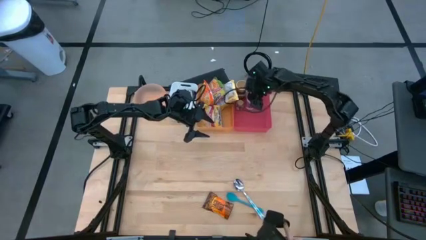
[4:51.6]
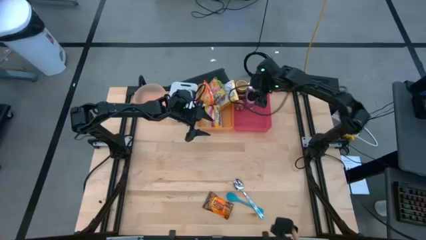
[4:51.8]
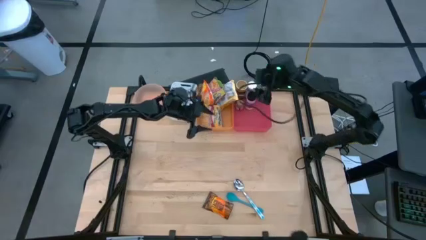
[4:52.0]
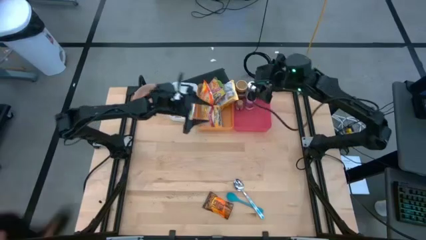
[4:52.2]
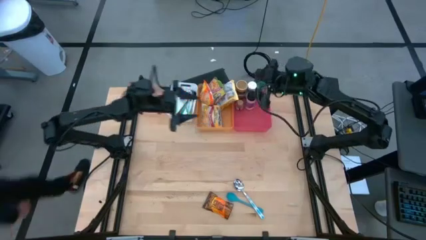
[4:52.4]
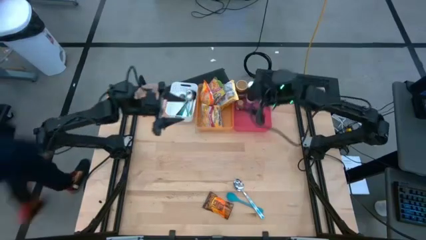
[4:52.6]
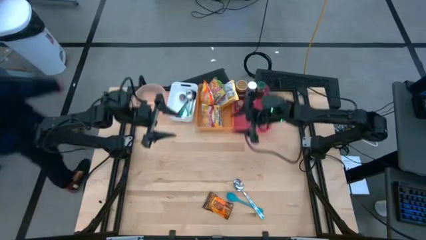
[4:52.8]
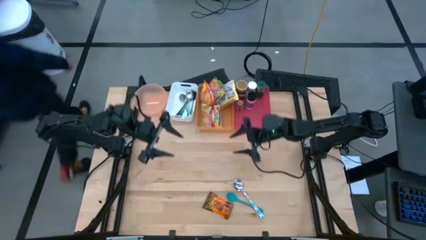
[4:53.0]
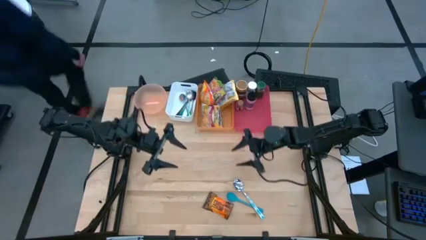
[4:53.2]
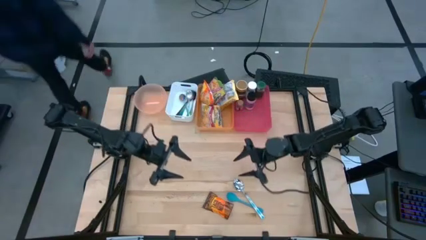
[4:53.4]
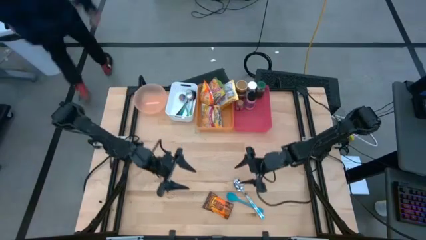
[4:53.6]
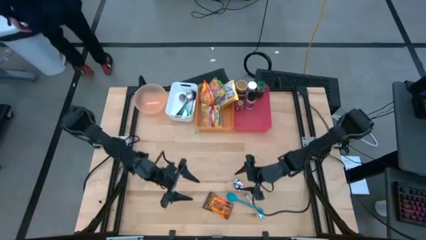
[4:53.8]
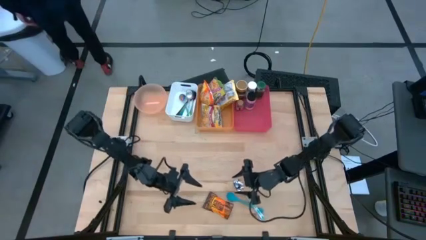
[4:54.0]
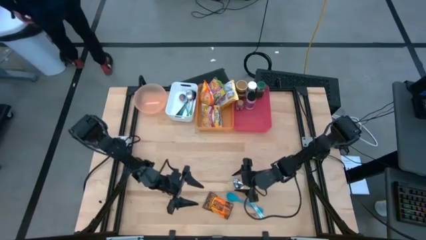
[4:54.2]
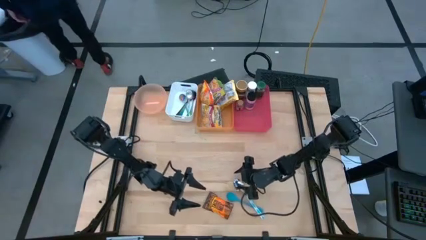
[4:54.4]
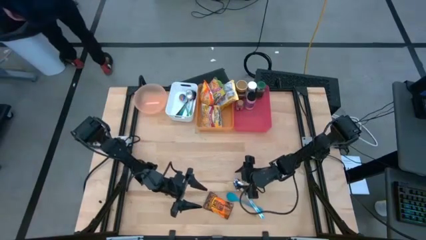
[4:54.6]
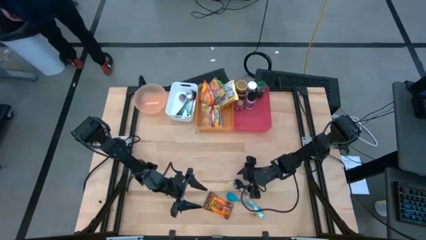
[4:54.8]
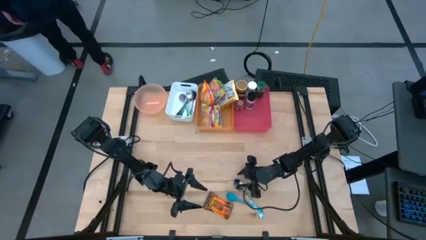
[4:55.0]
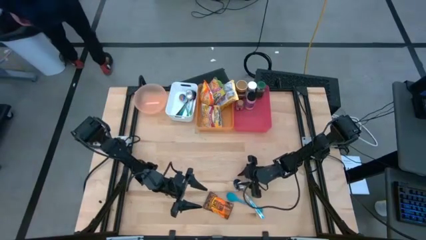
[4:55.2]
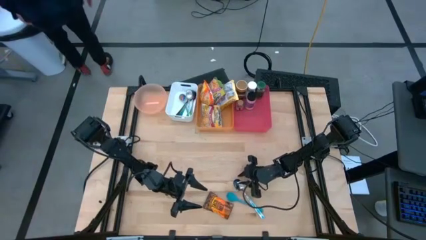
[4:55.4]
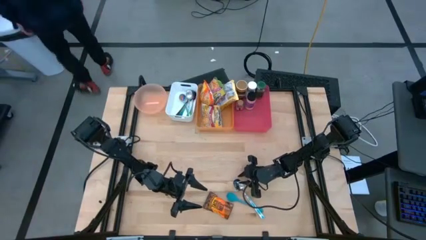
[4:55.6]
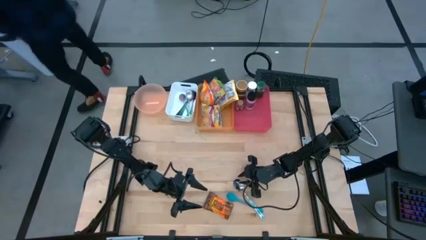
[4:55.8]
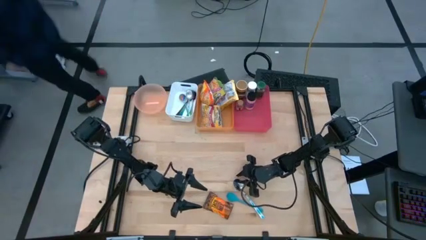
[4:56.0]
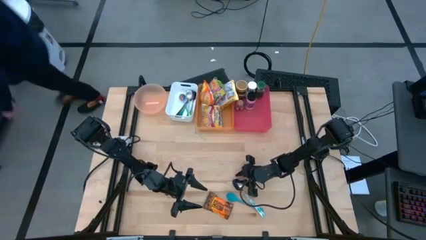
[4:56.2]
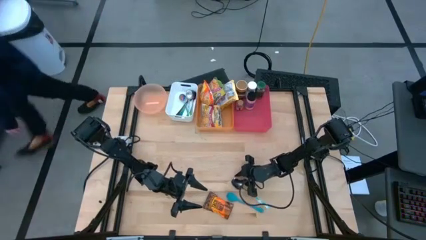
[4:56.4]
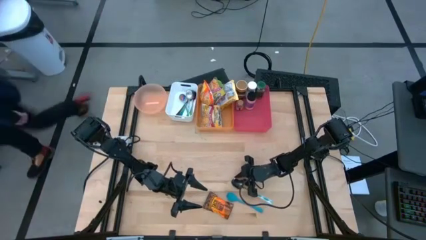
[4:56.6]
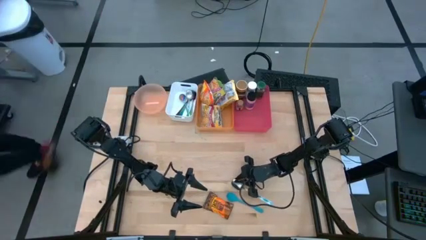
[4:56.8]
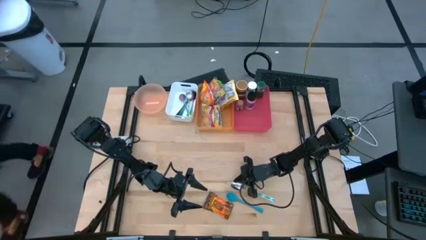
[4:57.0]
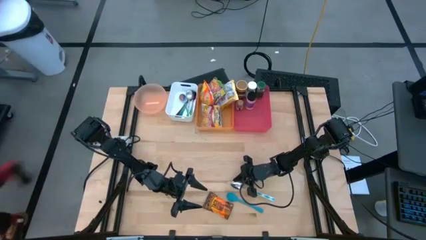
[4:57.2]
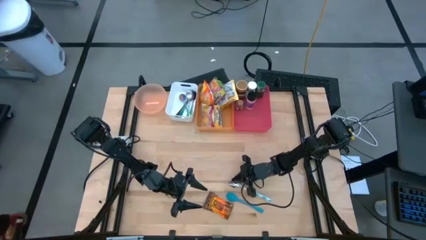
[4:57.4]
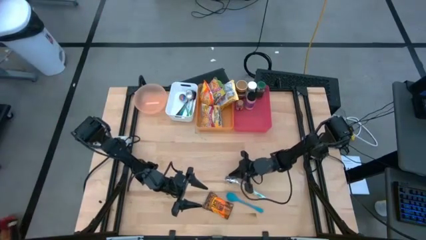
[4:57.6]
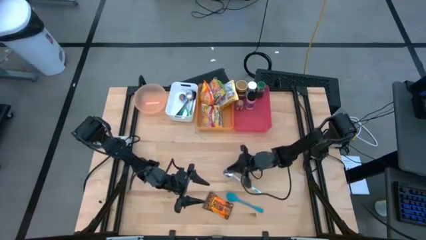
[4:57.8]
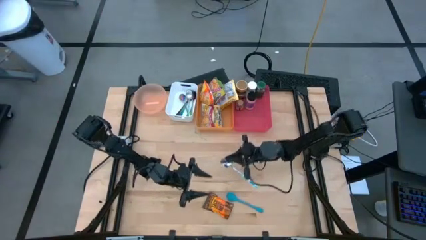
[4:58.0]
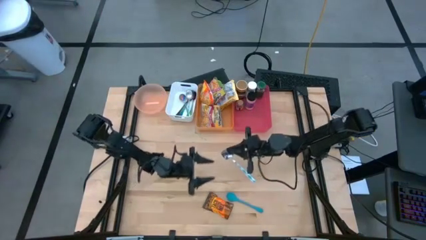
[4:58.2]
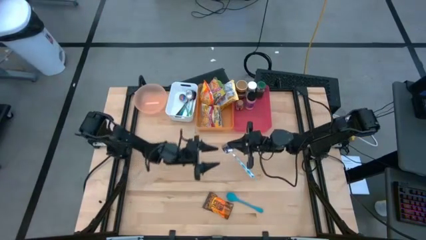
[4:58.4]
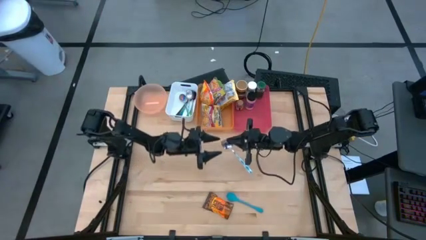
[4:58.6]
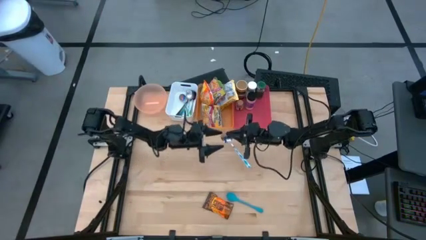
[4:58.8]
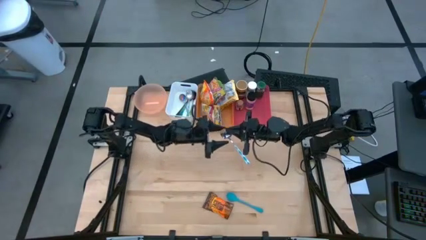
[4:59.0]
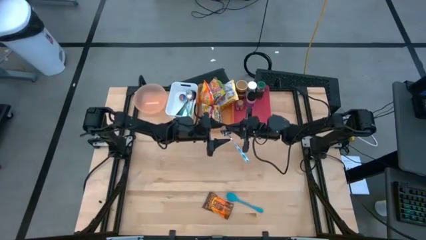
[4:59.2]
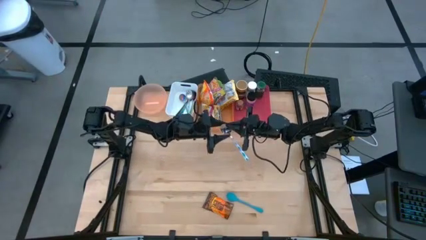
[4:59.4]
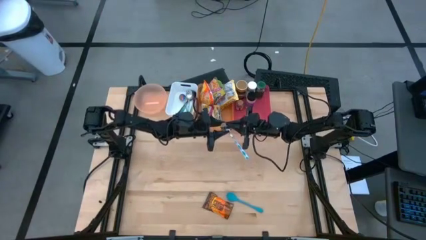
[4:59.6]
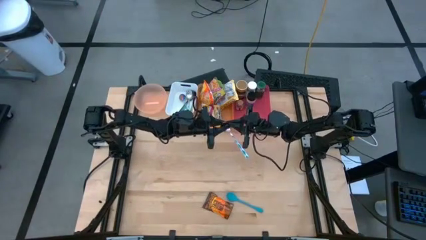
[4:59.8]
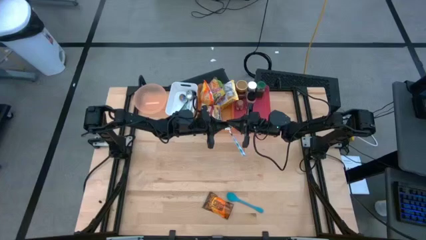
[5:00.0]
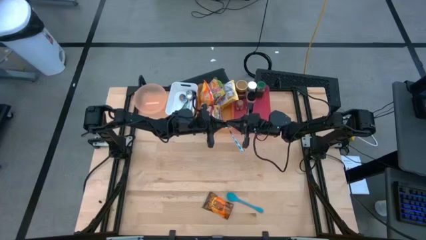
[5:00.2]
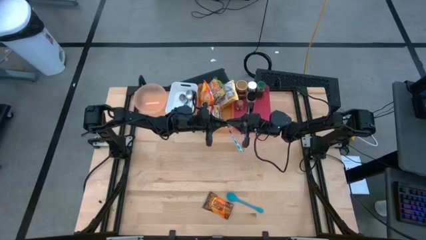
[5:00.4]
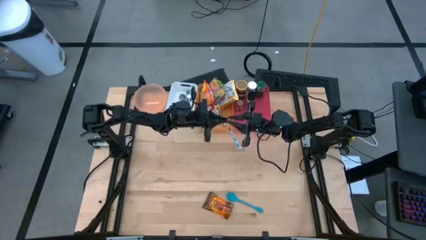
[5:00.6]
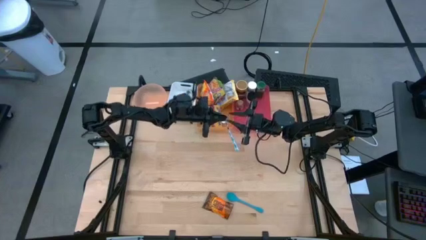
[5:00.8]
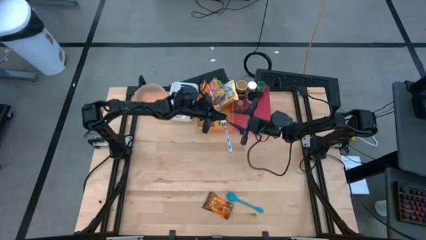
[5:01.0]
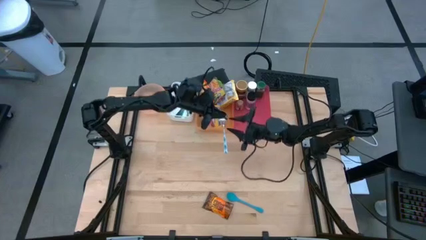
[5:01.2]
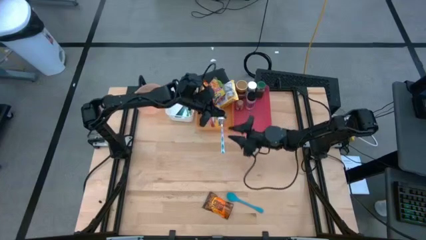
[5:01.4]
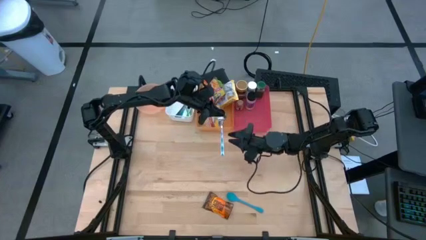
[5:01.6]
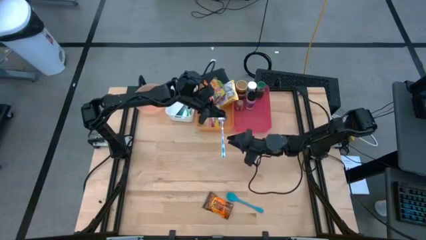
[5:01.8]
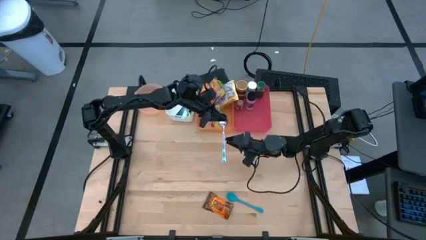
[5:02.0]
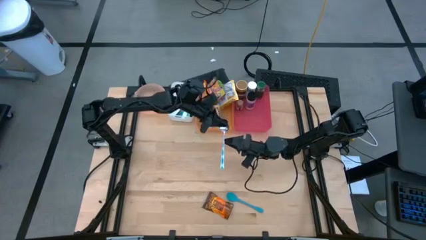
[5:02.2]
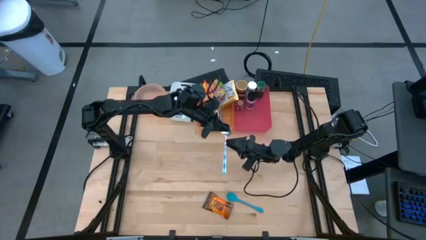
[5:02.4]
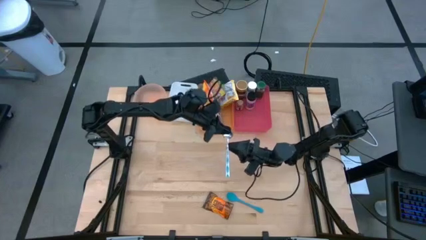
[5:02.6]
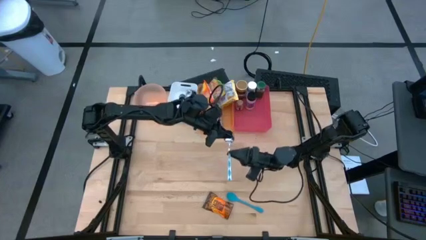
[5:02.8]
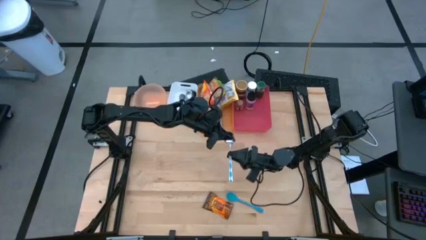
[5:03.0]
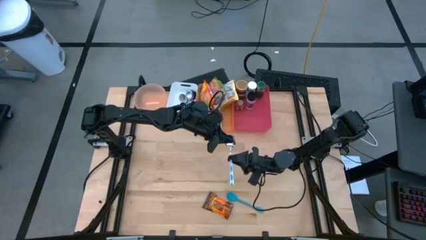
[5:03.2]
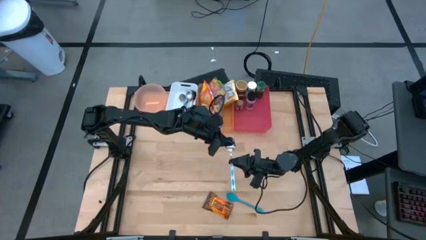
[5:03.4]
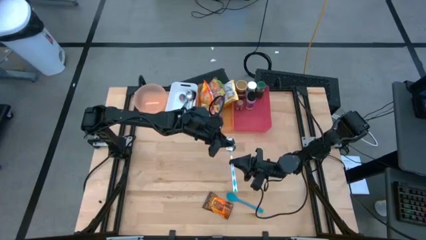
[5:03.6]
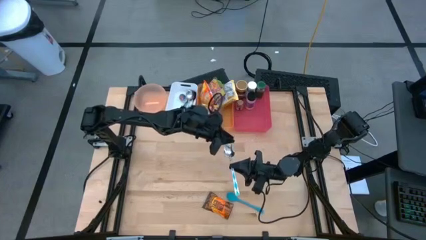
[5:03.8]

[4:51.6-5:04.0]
Task: Pick & Place Food Item
Put the blue patterned spoon into the white bin

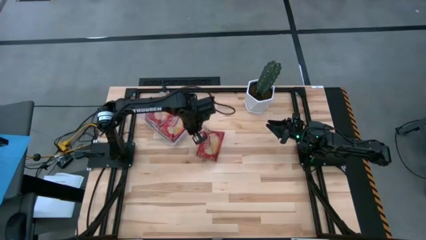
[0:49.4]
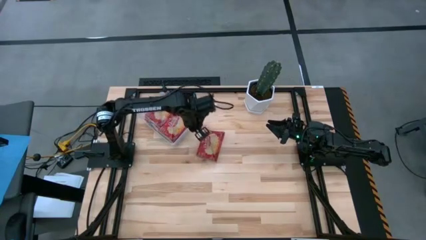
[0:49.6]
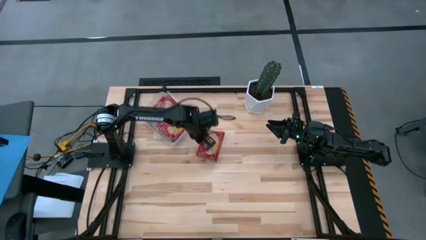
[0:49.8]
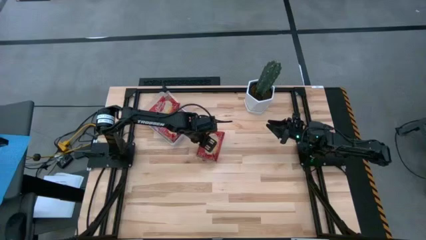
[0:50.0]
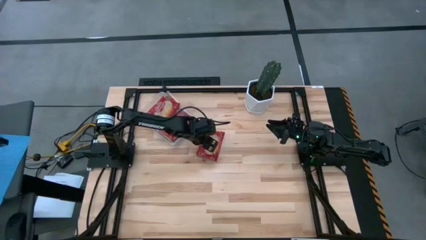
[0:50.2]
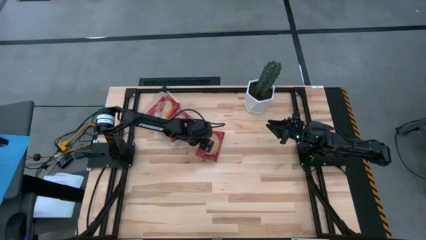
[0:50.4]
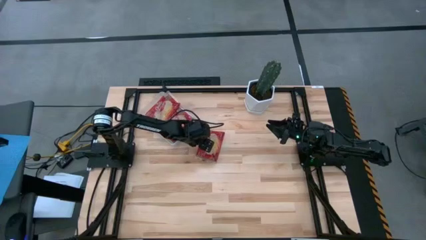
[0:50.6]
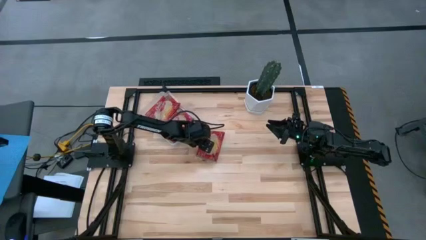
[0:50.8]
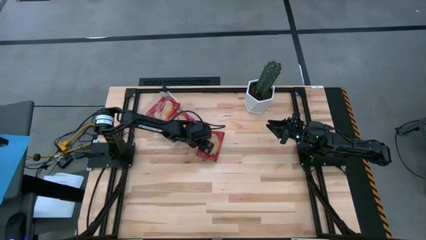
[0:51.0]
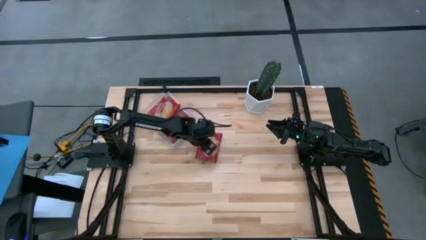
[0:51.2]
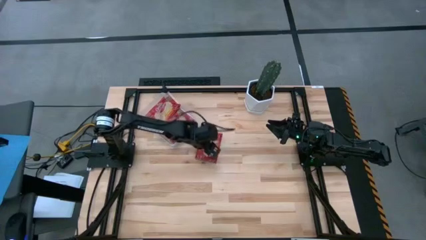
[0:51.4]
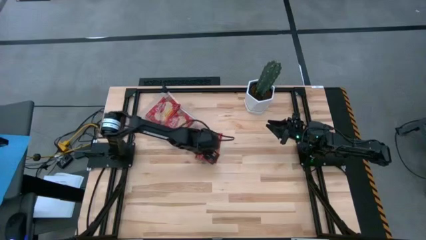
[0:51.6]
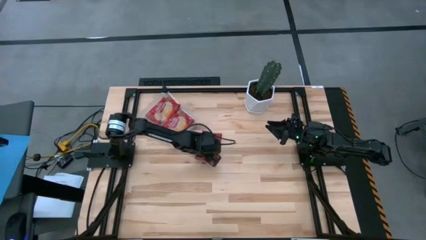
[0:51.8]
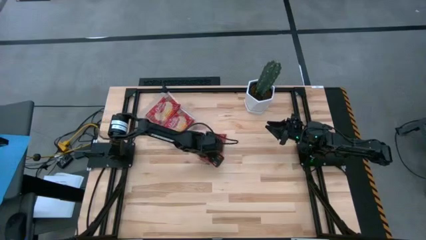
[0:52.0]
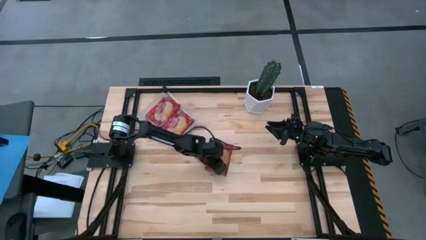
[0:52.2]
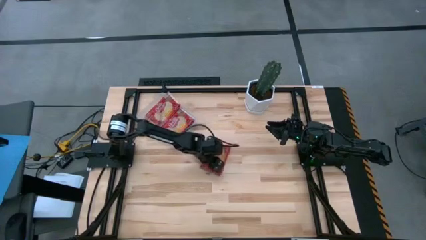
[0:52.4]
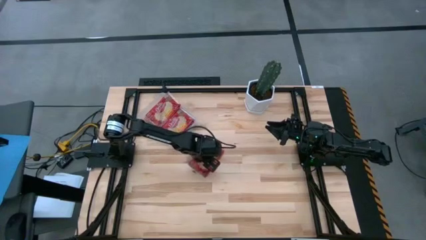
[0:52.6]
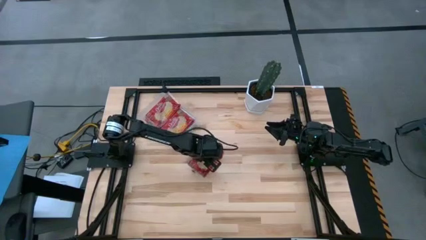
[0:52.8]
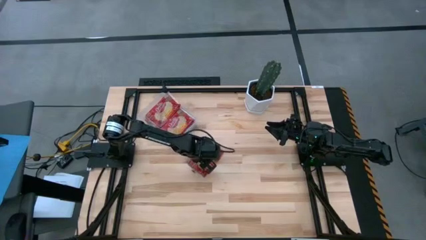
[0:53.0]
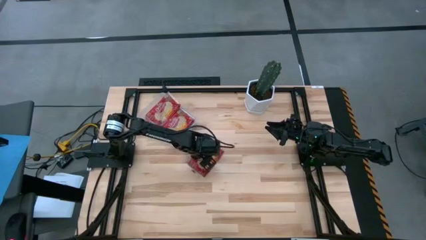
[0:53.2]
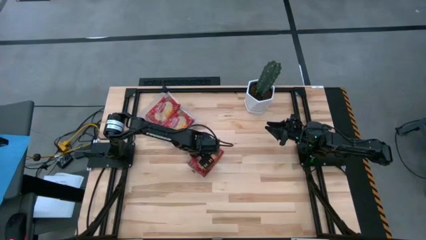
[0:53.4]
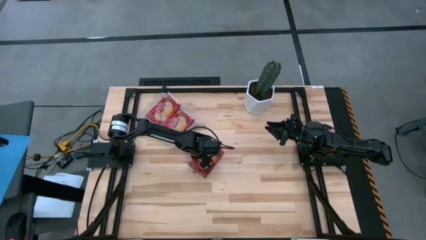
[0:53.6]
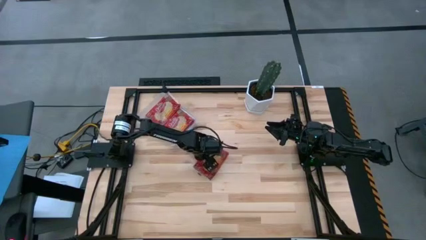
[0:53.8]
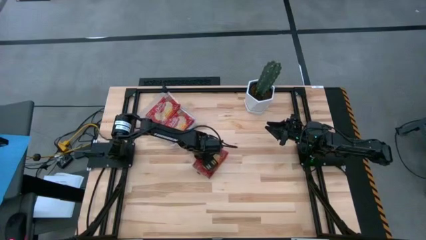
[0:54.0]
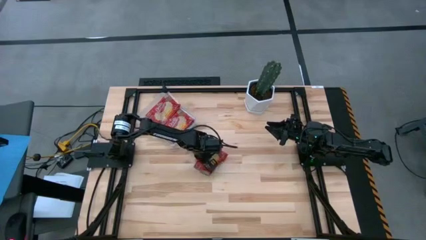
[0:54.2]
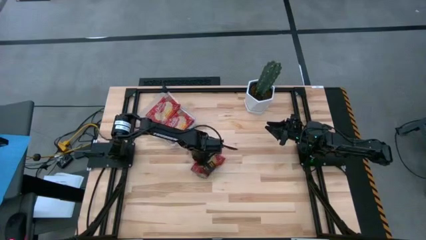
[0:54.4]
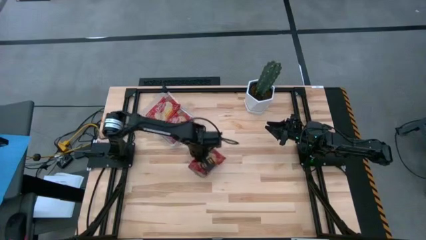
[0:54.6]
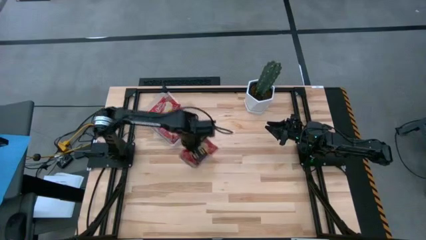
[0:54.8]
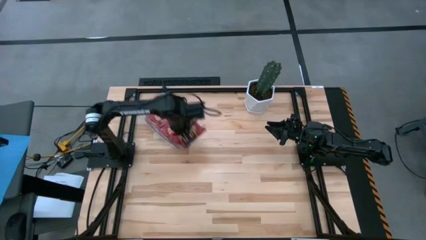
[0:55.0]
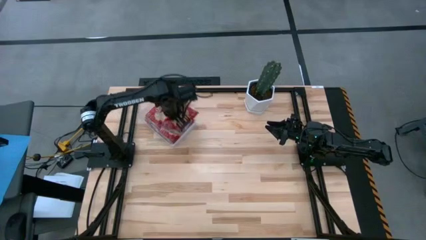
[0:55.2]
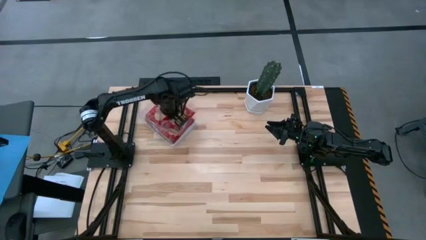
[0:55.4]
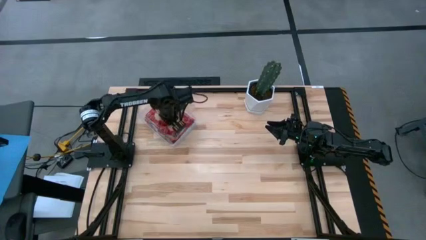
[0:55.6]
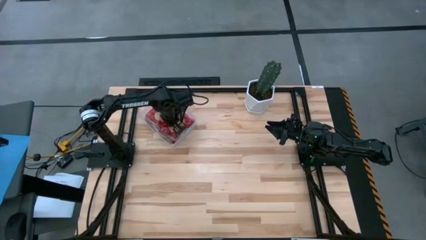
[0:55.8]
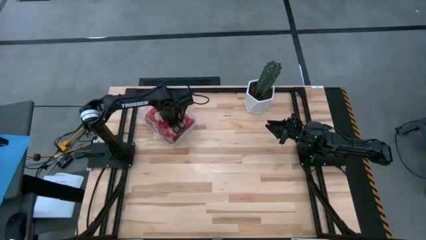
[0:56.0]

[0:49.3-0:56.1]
Task: Sort popcorn bags into baskets
Put the red popcorn bag into the transparent bin
